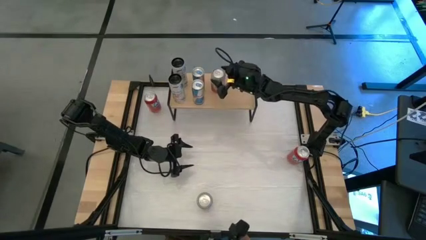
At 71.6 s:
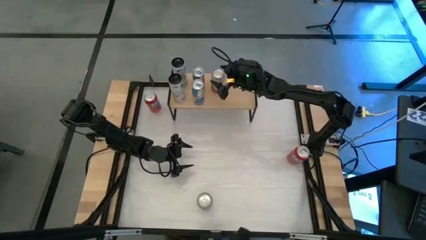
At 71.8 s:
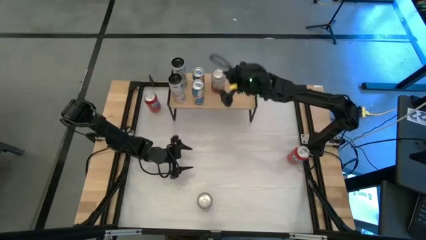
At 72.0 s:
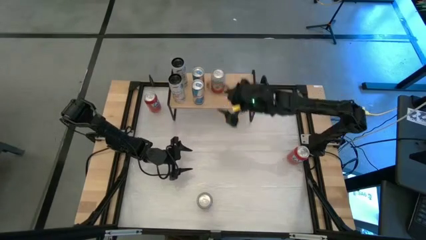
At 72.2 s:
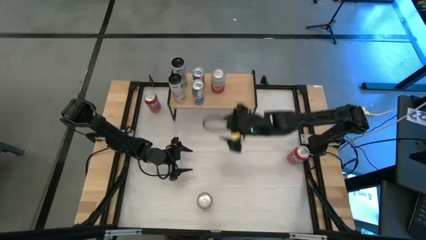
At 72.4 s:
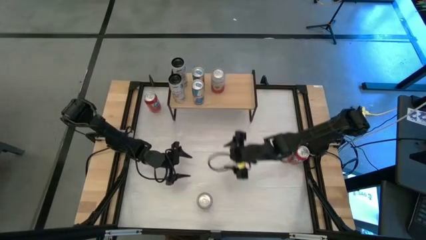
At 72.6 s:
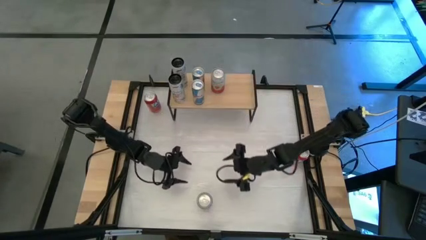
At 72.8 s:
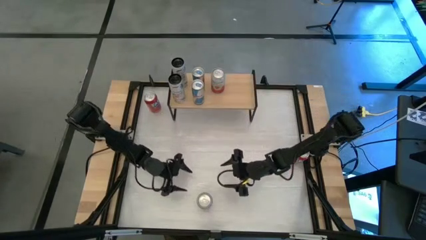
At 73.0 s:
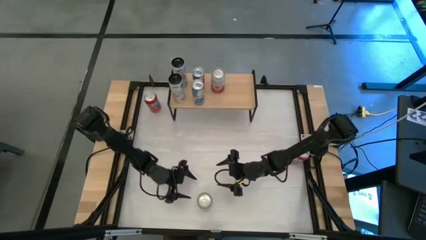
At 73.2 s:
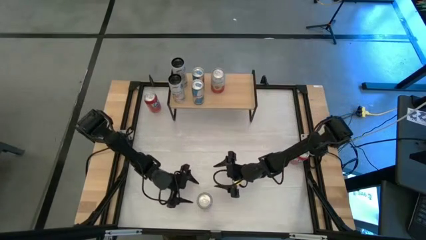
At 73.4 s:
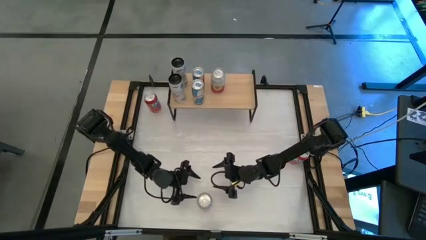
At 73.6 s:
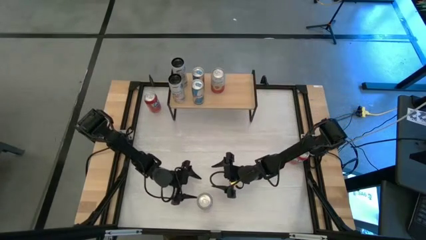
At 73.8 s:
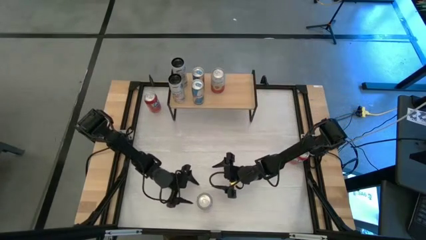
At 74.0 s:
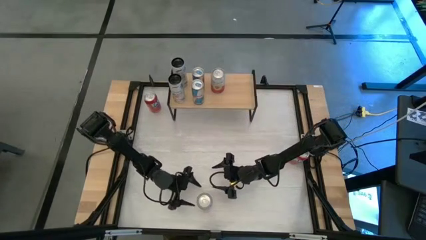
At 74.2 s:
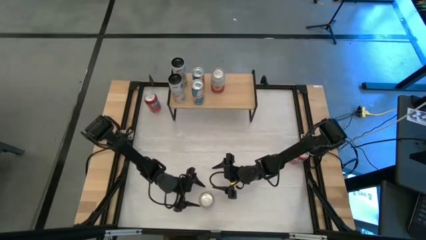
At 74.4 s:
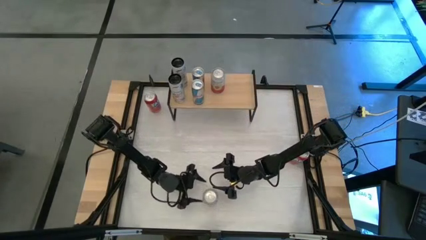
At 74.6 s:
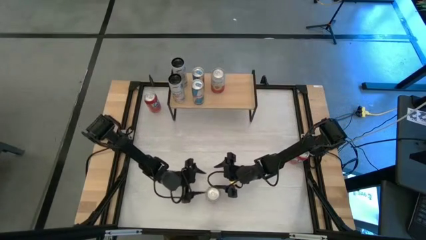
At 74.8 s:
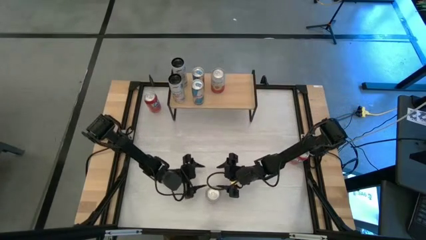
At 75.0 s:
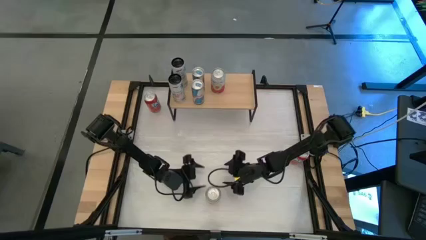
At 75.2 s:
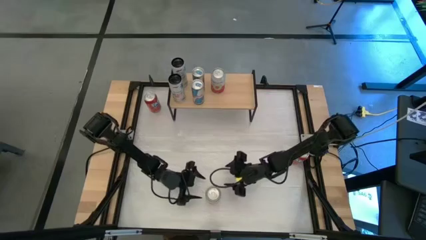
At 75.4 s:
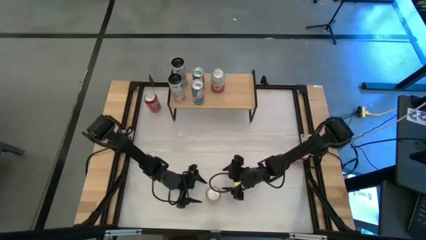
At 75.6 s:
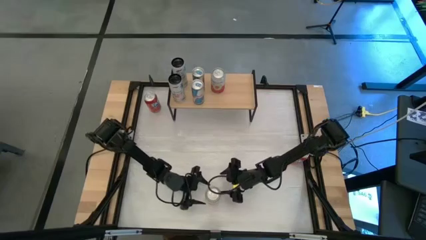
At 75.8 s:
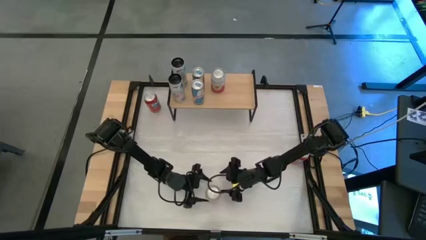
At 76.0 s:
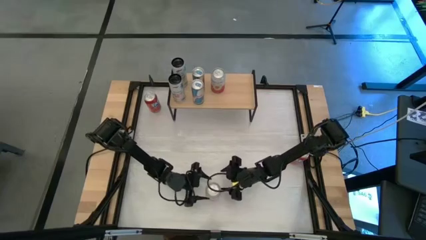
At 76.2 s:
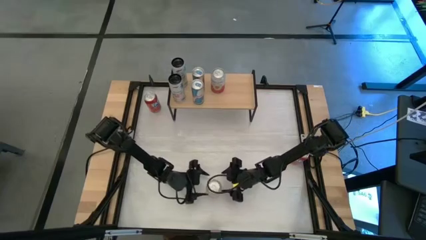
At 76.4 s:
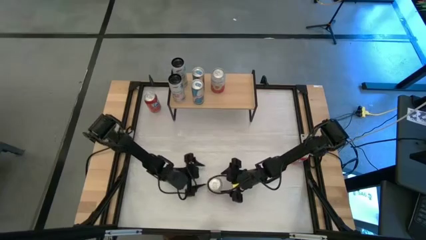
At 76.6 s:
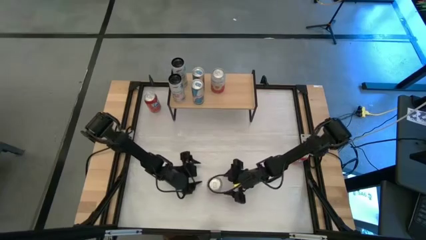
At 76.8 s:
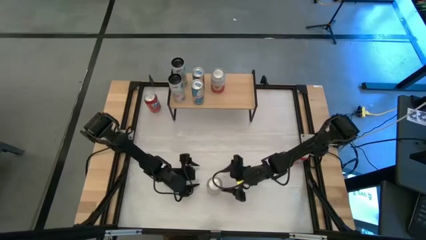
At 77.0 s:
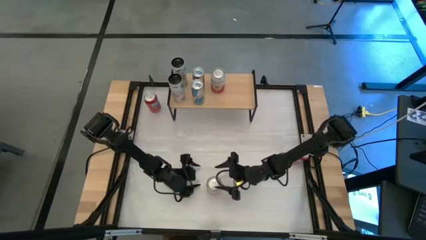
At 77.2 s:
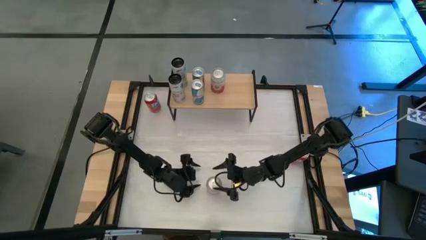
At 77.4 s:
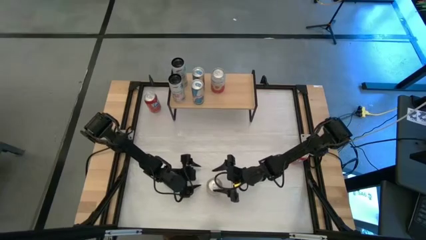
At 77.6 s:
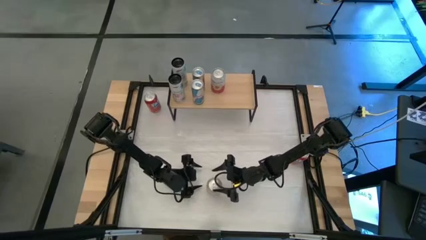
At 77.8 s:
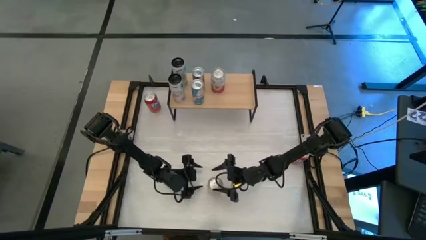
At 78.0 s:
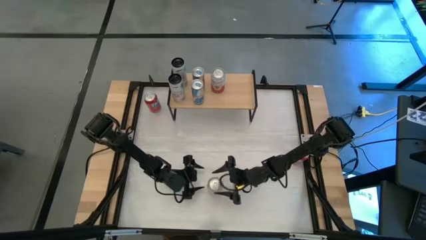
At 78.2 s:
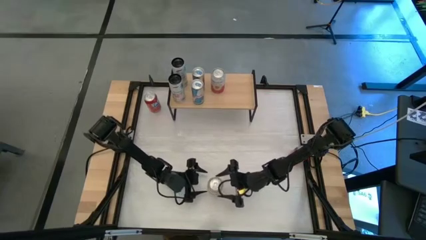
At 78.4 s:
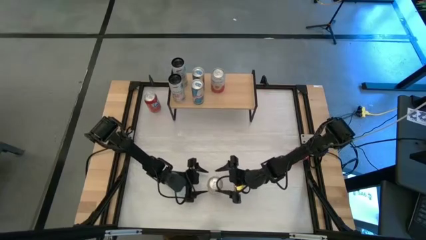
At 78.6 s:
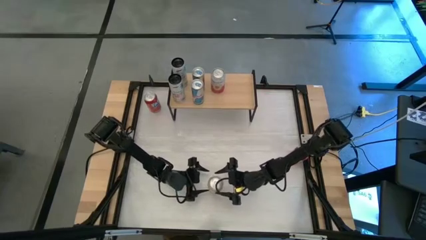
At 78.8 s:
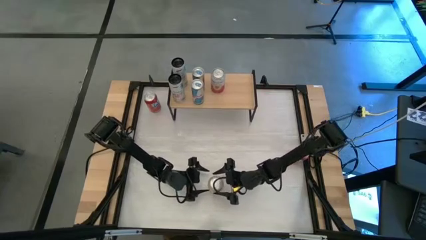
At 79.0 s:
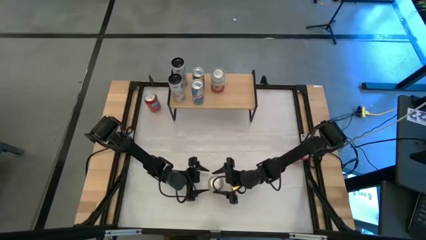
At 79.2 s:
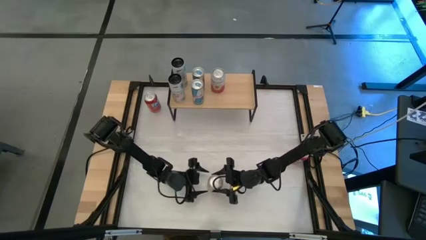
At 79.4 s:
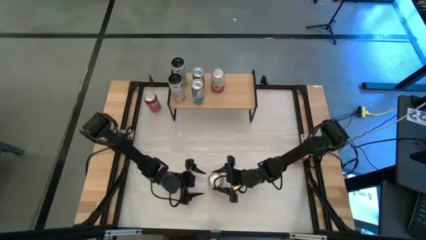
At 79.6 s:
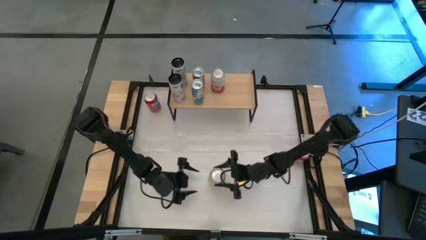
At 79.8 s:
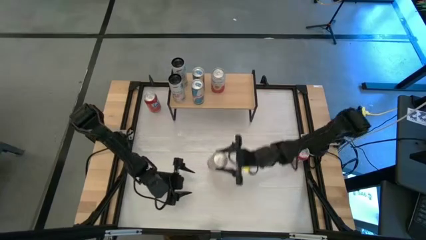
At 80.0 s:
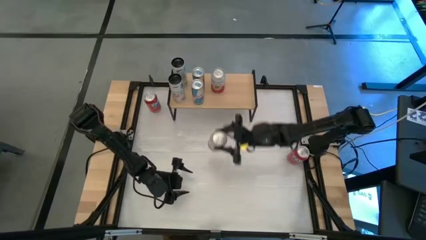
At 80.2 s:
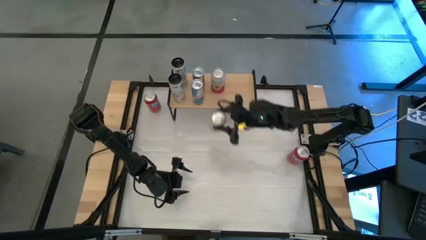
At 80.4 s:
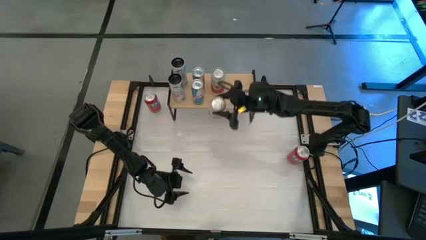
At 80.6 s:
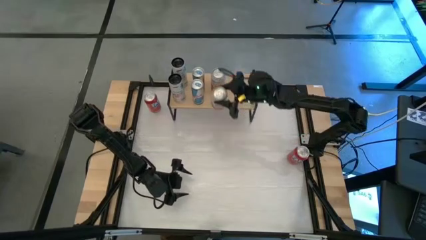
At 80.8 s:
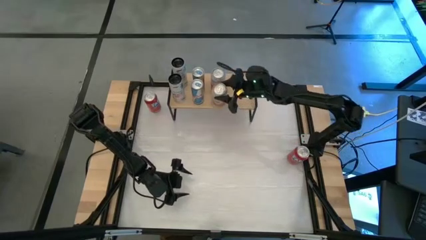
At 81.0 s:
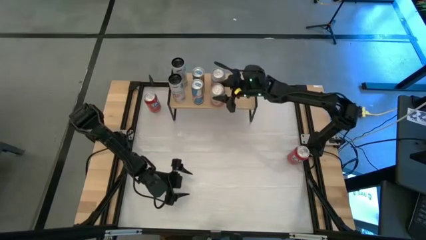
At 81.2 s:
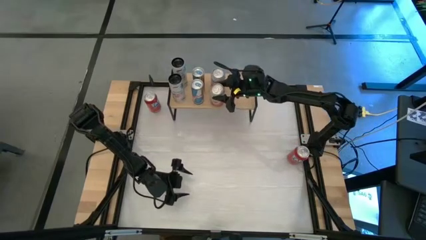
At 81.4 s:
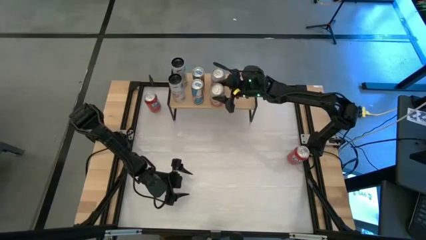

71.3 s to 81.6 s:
Task: Place canned beverage on shelf
Put the pink-white soda can on the shelf

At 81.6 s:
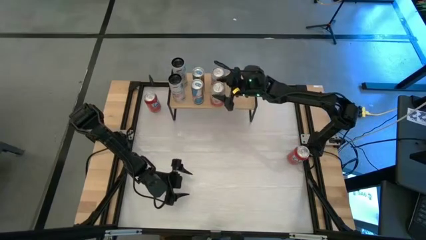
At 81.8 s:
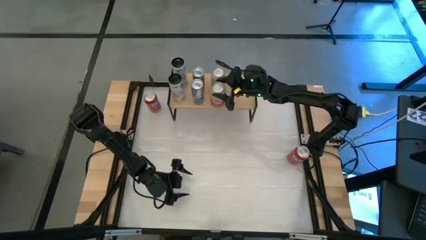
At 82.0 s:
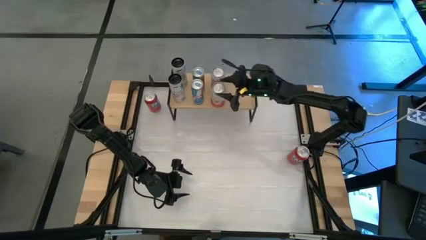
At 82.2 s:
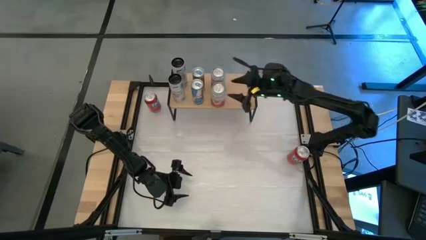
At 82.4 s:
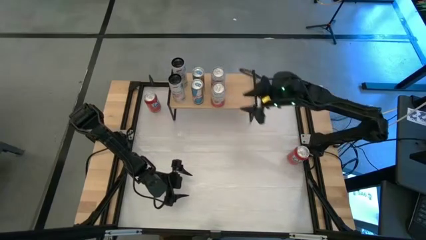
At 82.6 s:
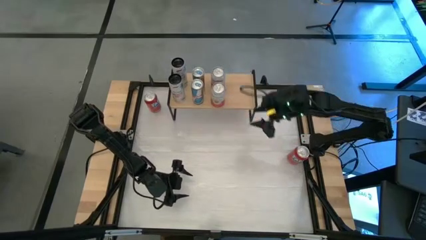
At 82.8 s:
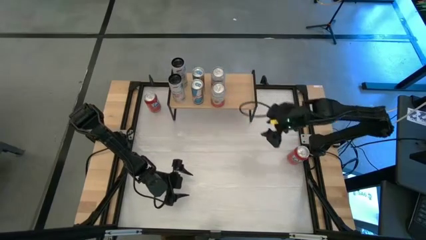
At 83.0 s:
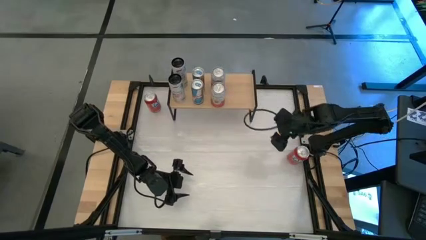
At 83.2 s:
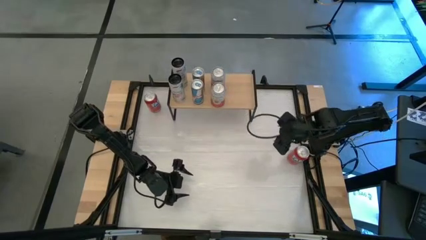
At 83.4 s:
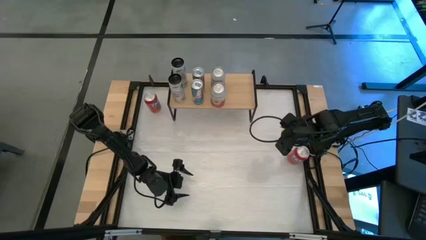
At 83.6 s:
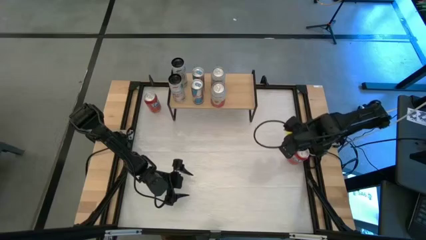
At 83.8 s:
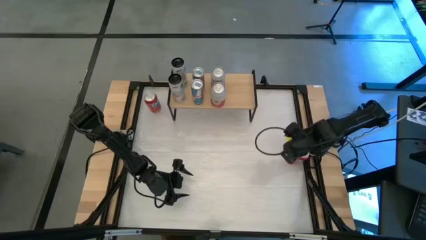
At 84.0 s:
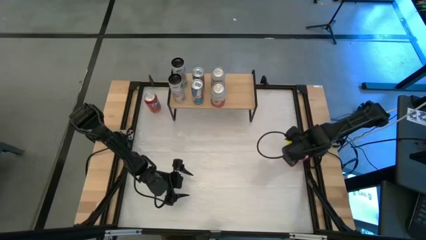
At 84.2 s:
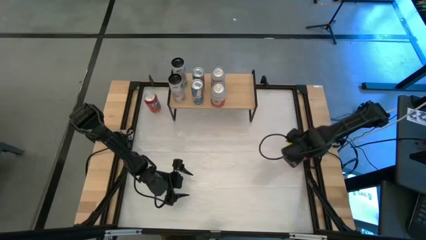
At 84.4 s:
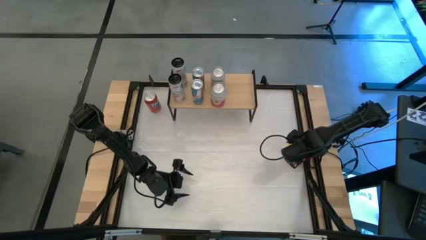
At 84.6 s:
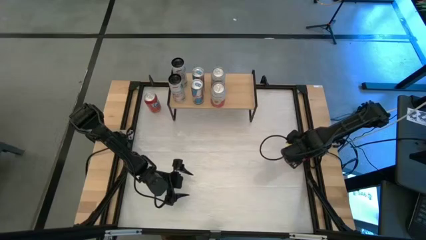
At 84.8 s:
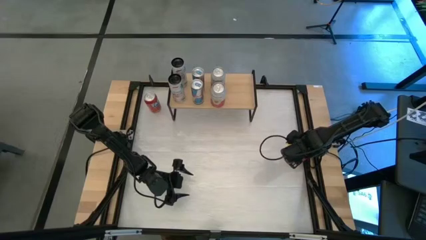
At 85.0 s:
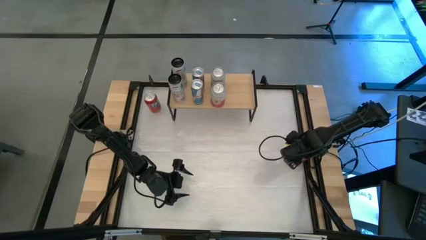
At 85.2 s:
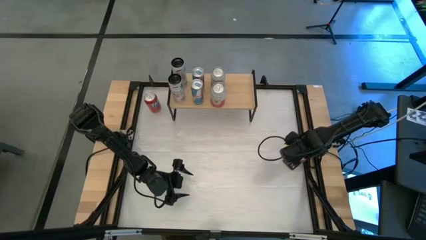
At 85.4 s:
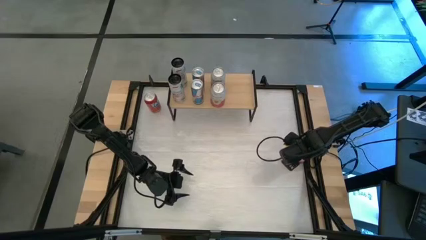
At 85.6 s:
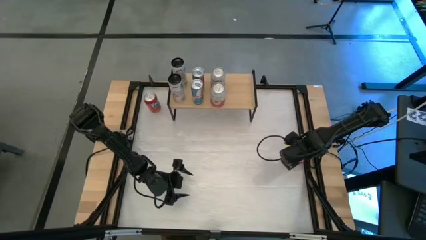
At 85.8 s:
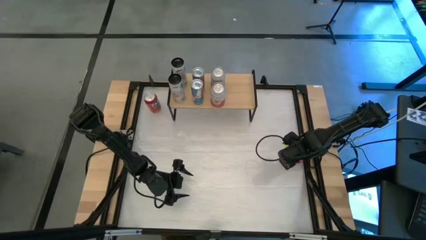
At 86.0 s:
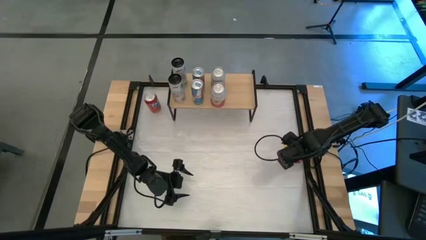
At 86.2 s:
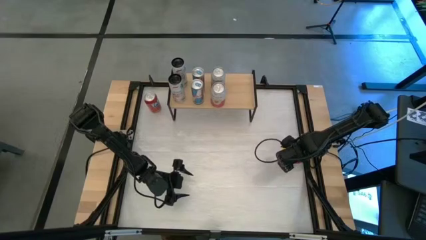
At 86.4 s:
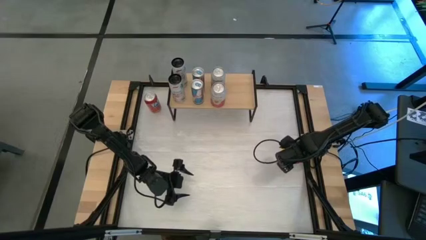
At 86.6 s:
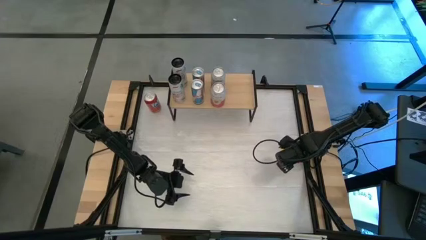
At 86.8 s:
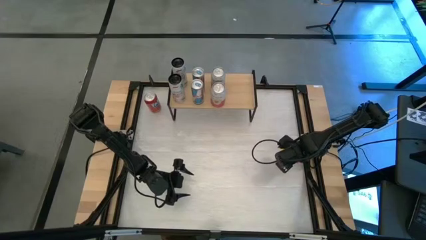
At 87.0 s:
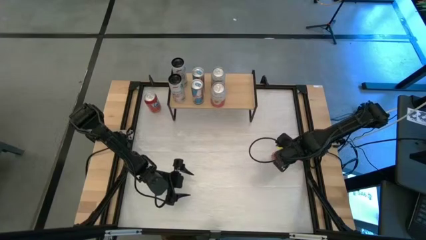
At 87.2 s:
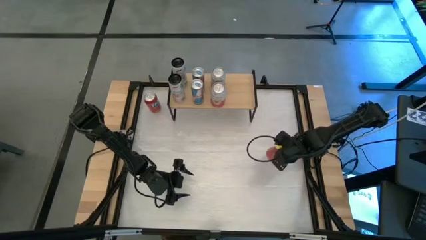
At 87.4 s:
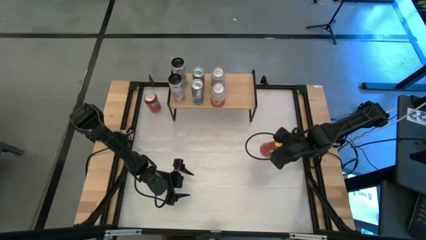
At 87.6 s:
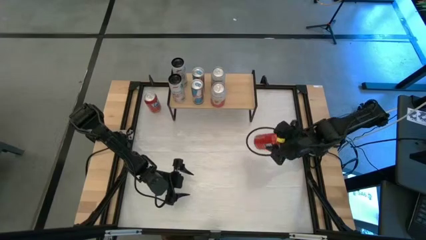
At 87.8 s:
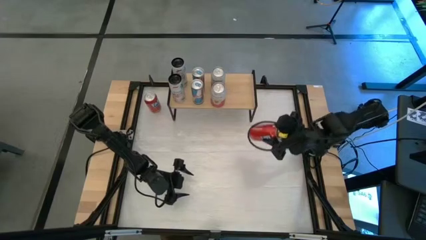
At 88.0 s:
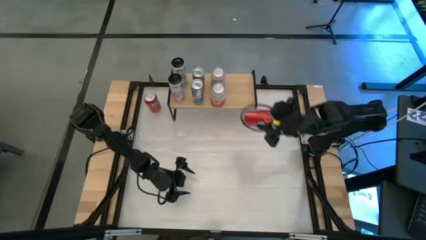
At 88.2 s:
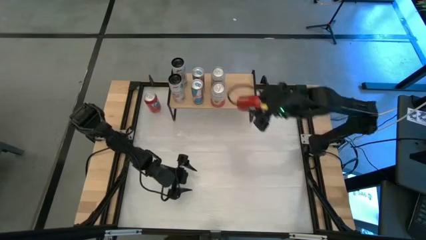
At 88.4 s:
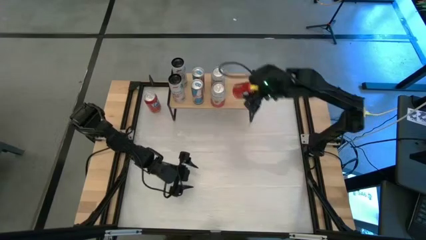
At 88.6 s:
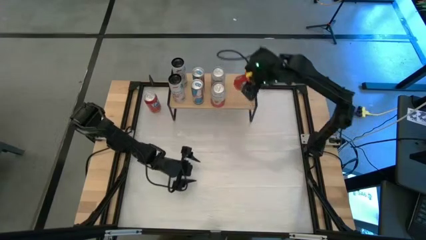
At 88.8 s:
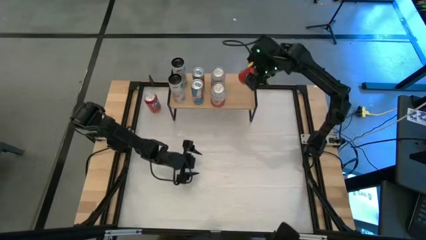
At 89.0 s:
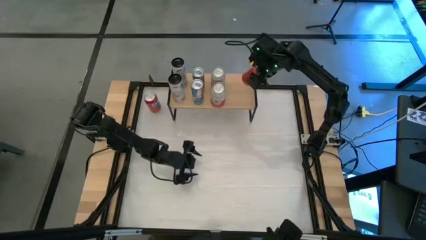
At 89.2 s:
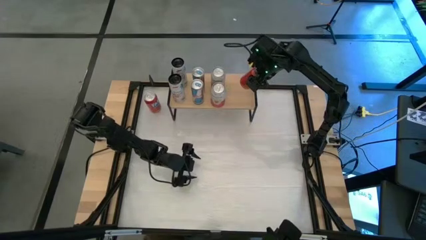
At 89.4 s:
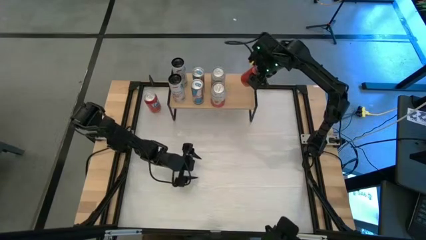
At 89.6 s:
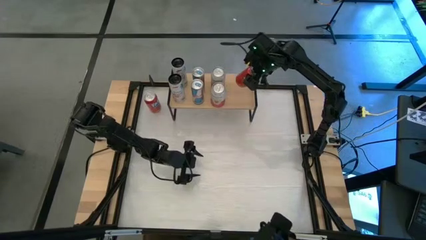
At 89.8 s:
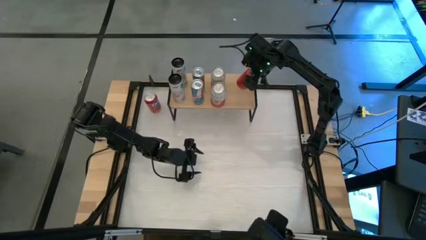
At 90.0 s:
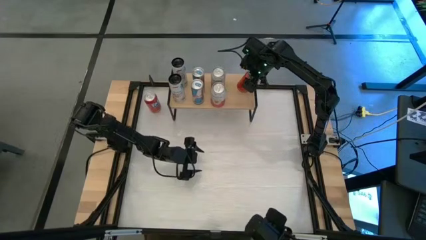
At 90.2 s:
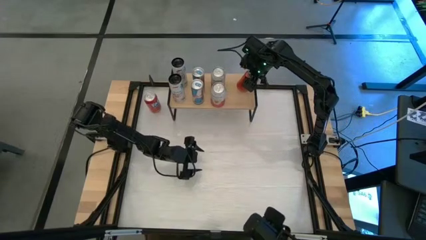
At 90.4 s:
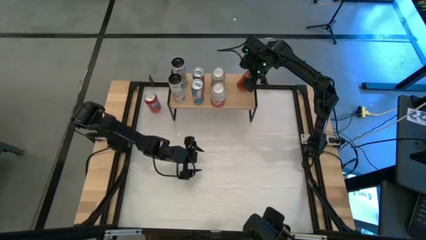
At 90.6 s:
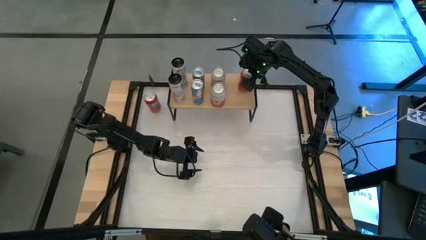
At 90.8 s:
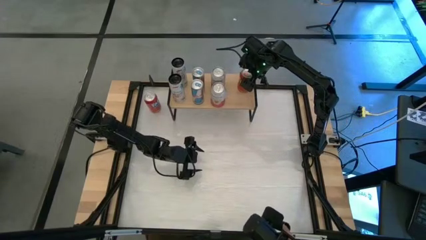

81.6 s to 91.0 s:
Put the right red soda can on the shelf
